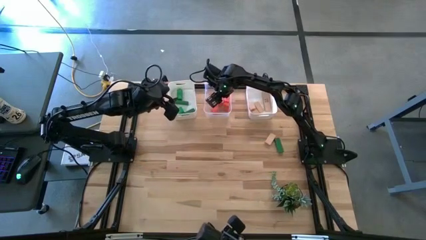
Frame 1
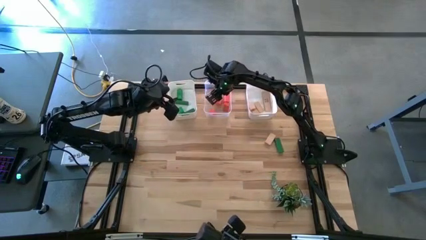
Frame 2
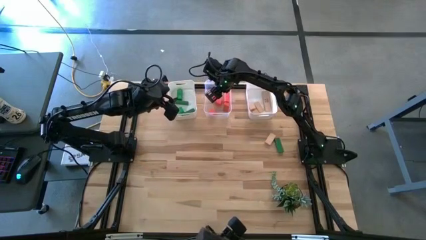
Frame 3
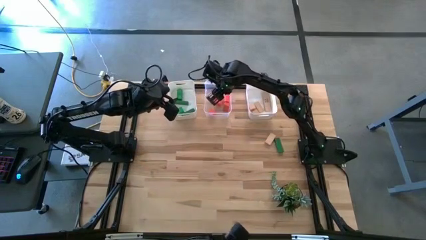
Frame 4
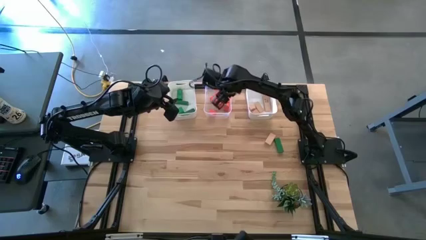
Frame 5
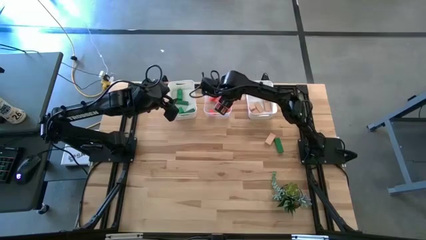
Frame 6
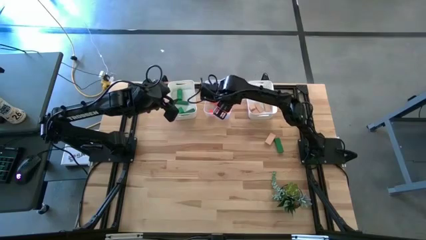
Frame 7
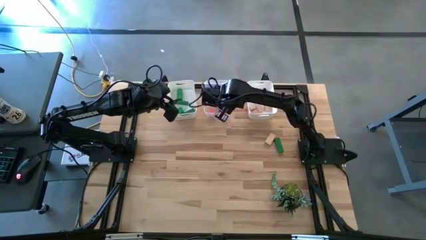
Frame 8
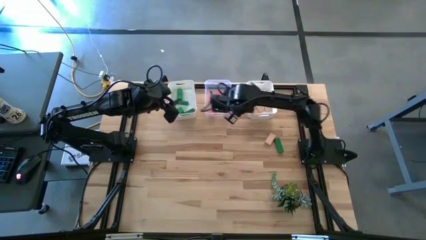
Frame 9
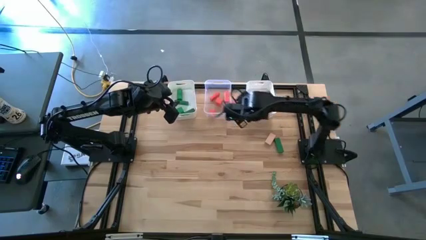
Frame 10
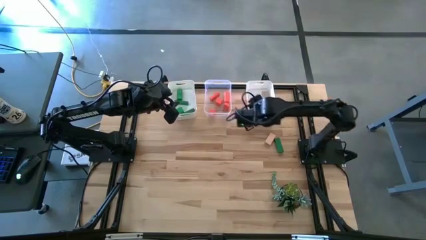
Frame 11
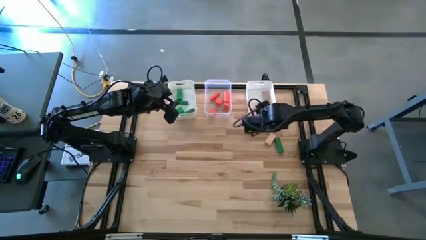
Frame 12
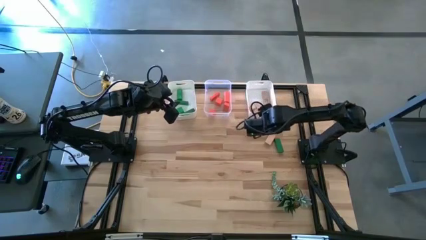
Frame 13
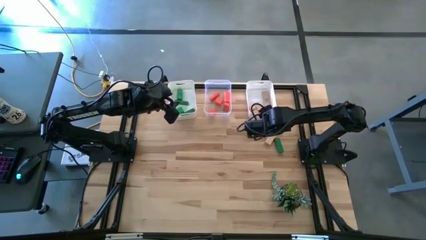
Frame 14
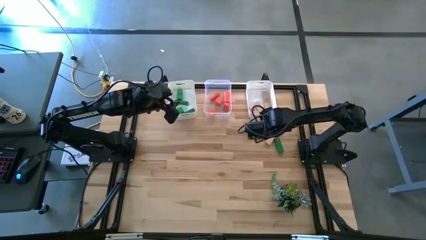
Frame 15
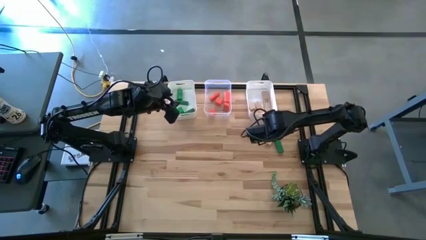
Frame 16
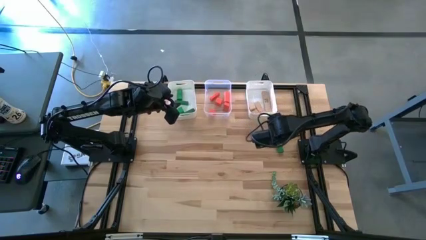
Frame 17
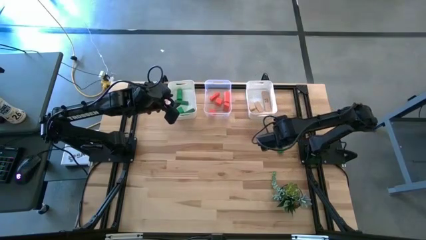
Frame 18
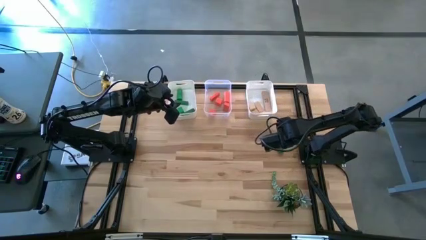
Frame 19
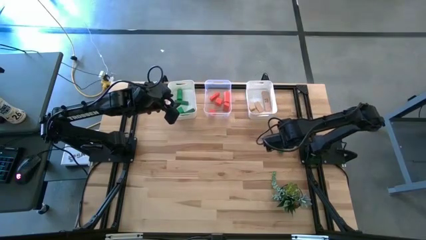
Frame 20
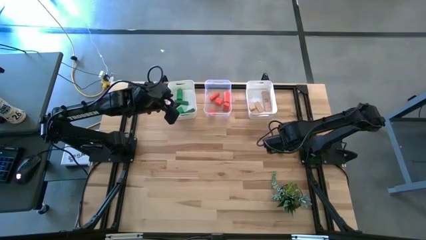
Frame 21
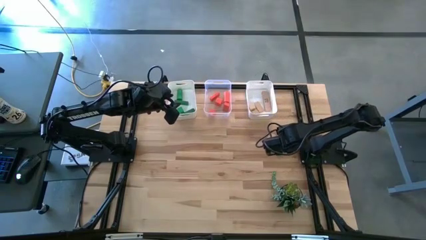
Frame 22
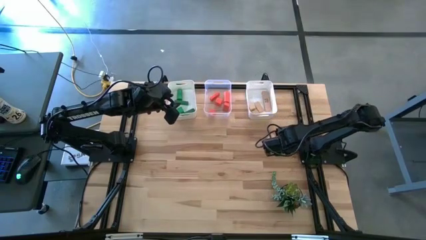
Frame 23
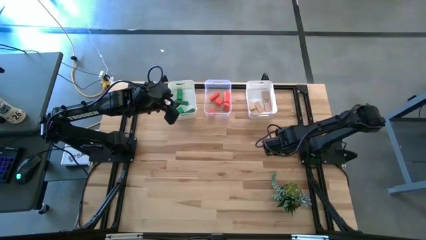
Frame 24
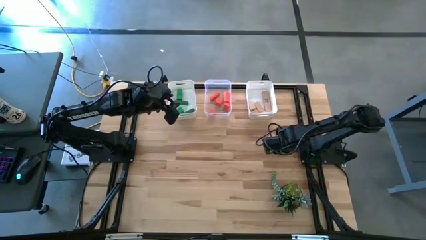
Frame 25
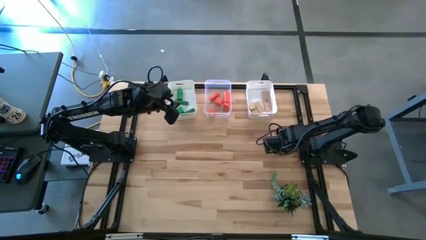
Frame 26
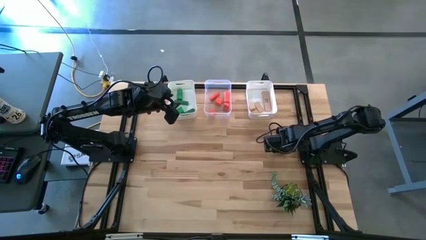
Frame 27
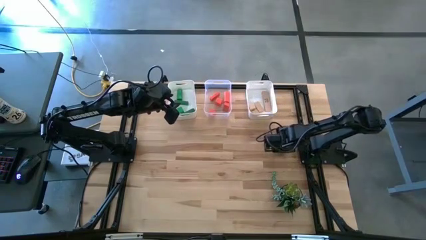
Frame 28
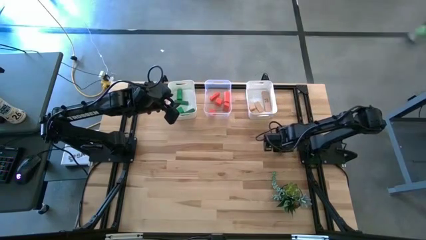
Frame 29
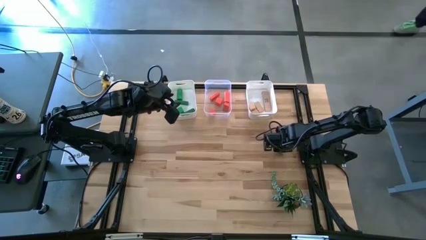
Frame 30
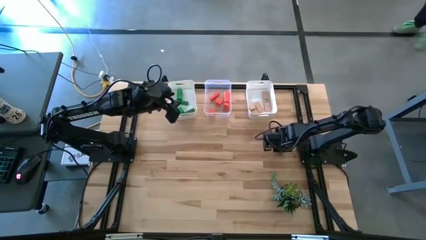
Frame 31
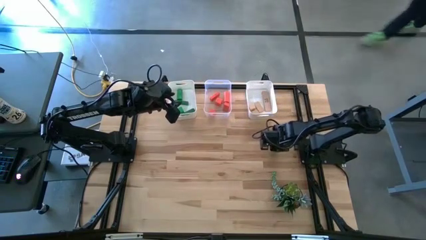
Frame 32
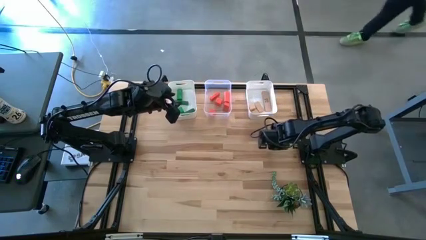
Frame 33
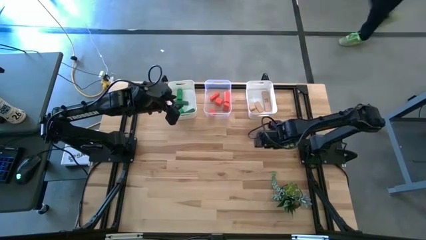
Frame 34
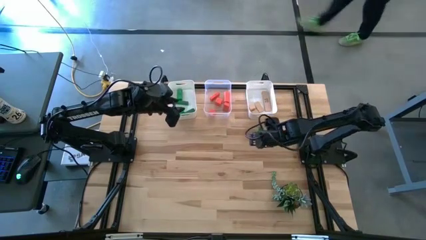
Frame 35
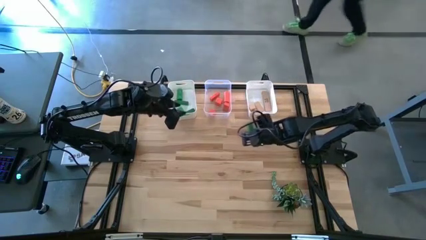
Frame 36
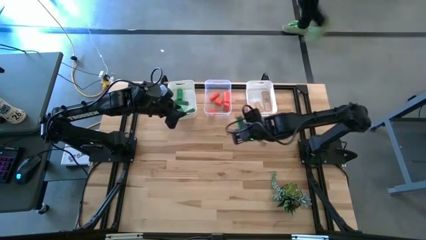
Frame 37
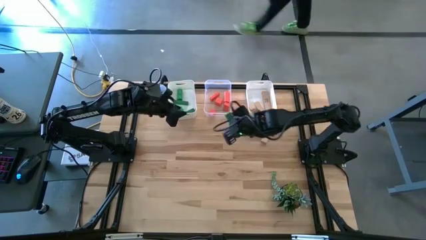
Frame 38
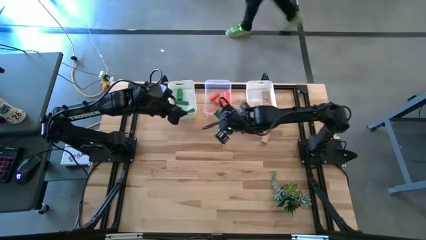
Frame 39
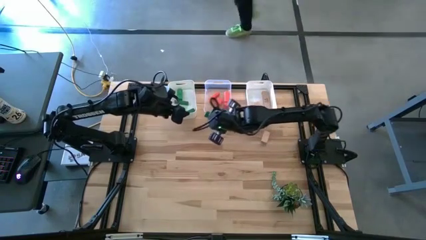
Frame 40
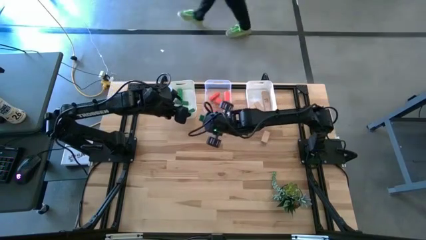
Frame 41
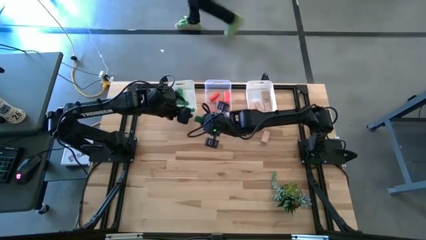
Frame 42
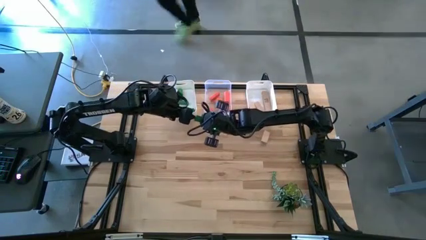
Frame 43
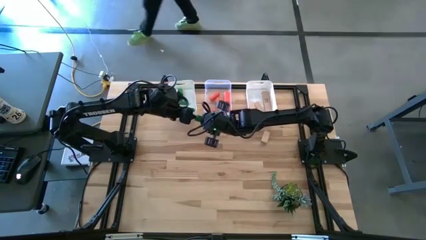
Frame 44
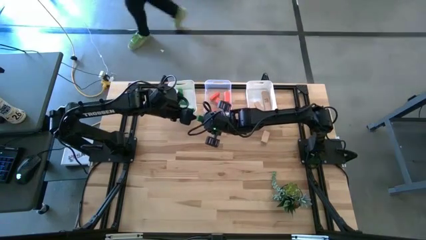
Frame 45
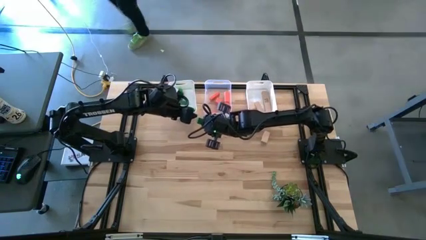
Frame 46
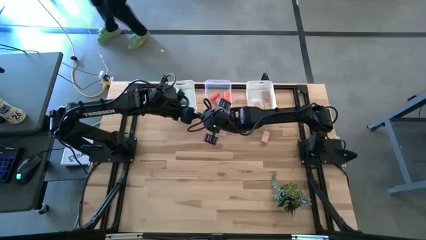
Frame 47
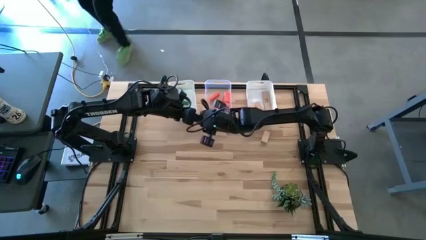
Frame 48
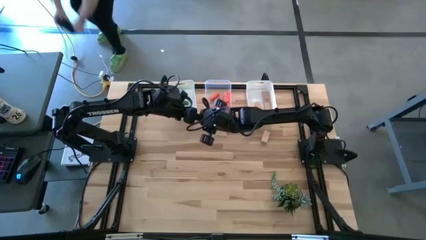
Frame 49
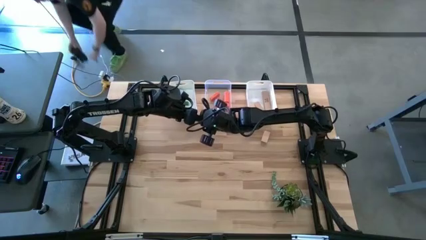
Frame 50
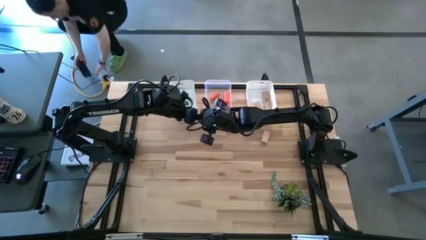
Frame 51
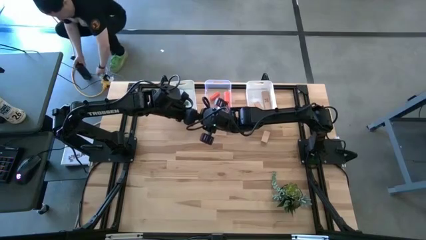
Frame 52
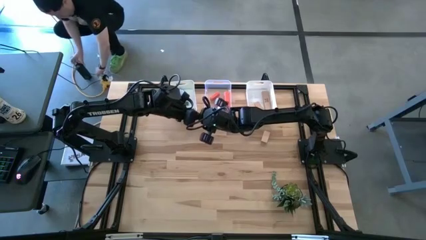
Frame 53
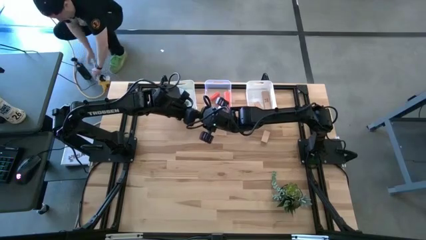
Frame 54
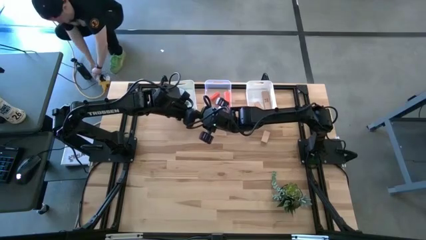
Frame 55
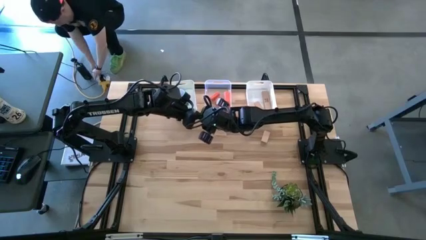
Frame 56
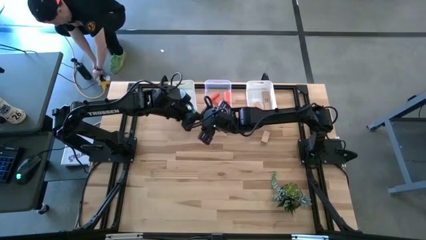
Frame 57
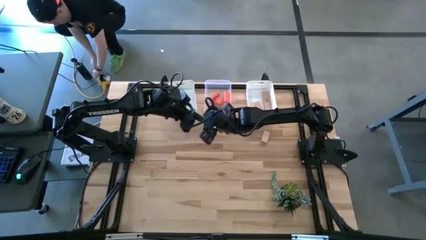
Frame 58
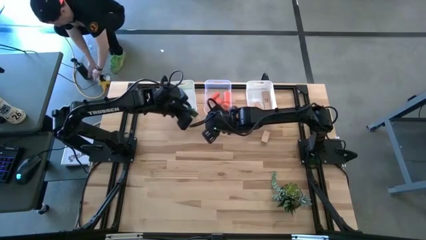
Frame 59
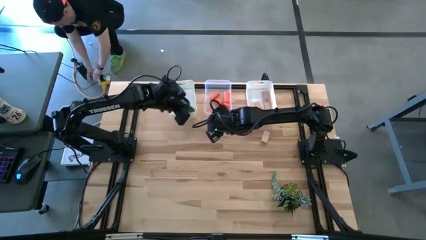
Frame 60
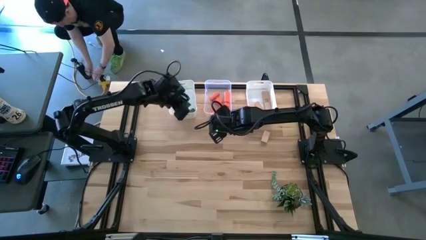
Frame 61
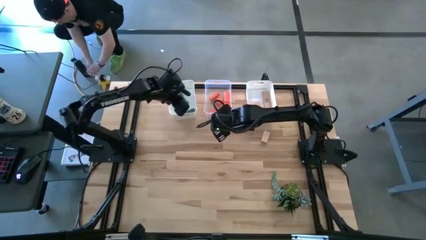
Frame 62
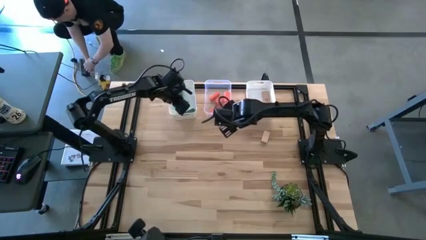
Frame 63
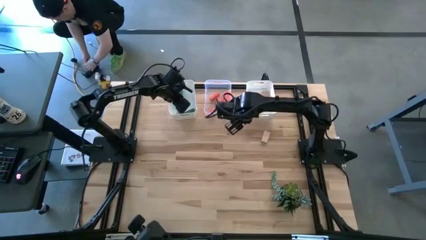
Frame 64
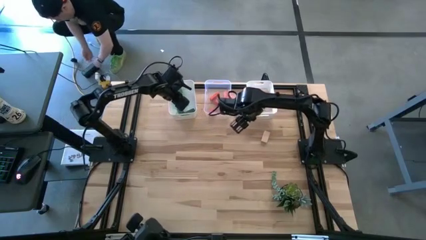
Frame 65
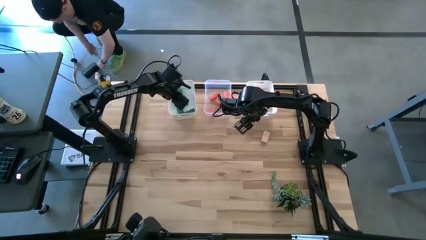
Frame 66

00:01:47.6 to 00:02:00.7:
Task: Sort & place blocks by color
Put the green block into the left white bin

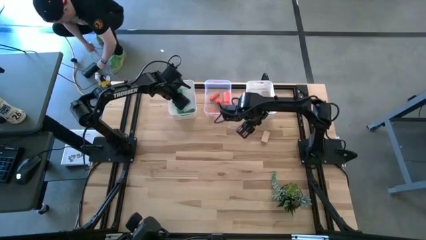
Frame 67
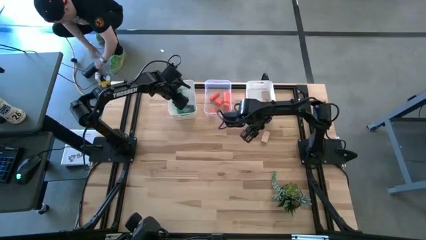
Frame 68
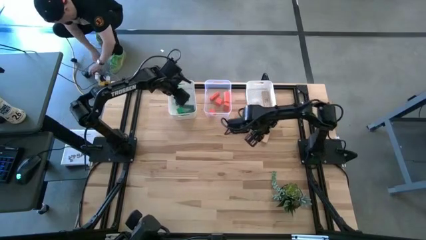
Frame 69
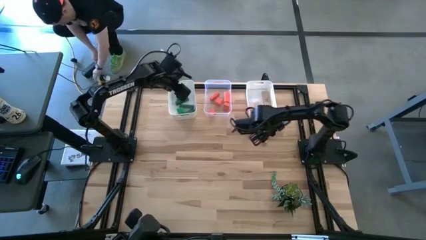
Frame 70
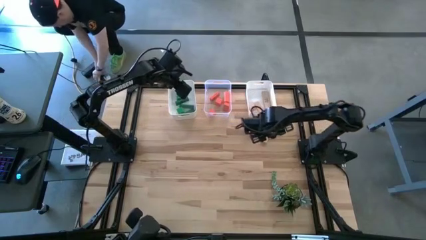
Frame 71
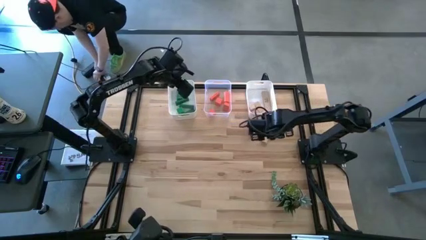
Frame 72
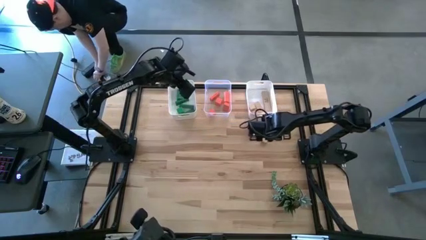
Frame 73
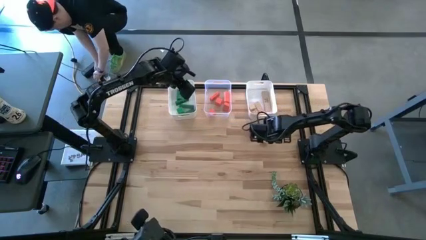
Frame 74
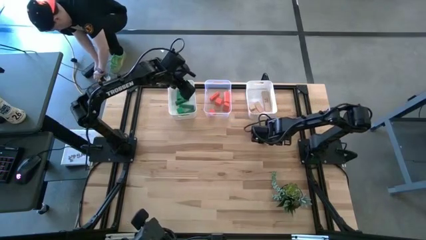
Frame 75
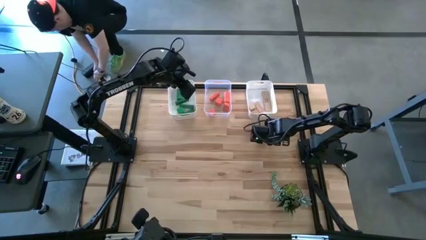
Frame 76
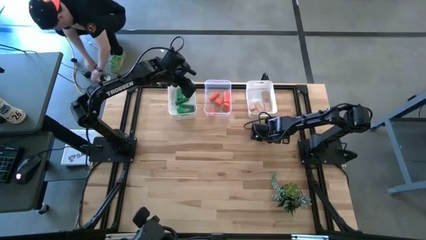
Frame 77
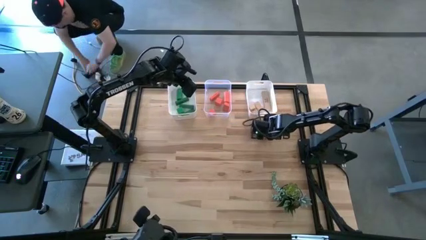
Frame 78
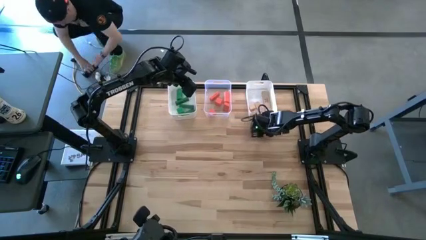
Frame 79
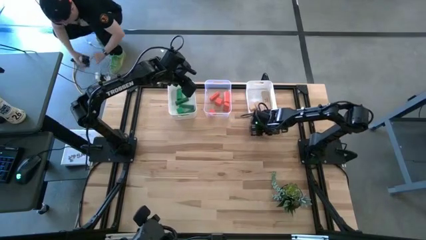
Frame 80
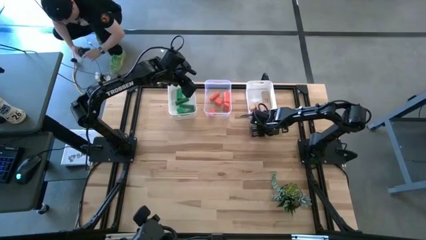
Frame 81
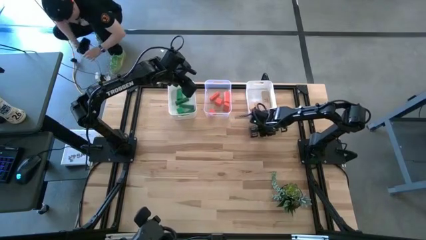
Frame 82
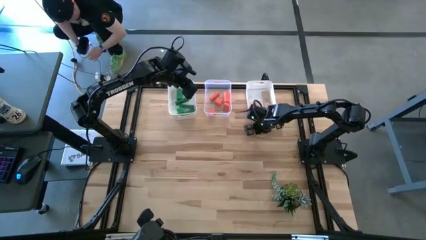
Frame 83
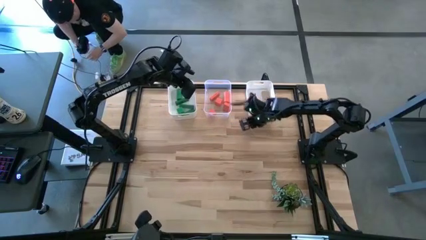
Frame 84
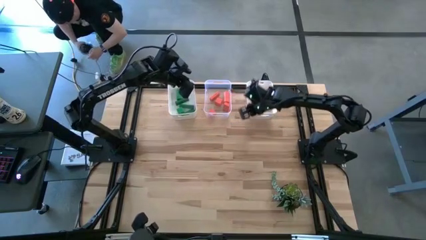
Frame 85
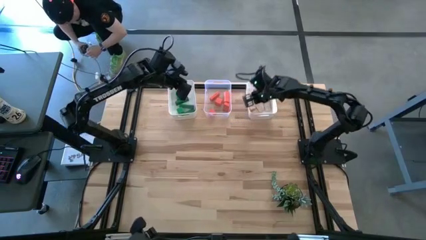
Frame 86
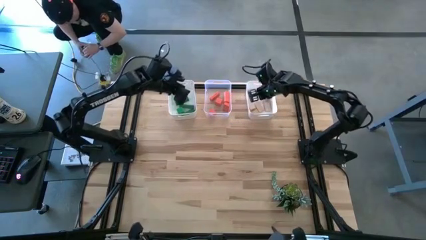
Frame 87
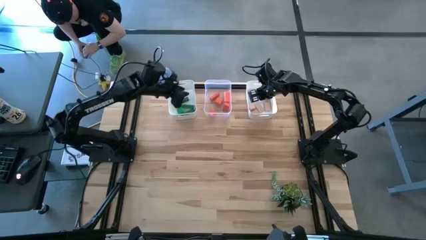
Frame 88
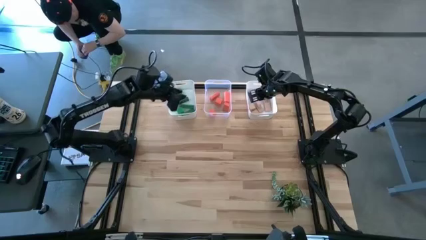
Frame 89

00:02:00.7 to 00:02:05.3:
Put the brown block into the right white bin
